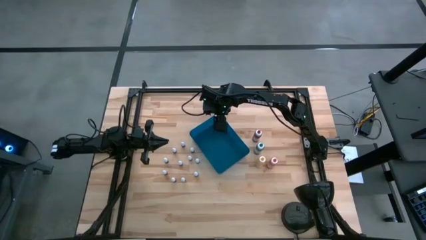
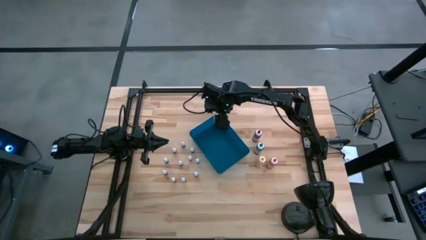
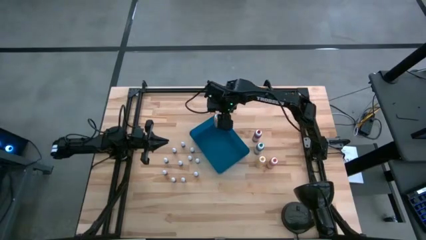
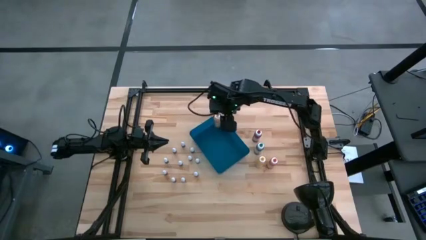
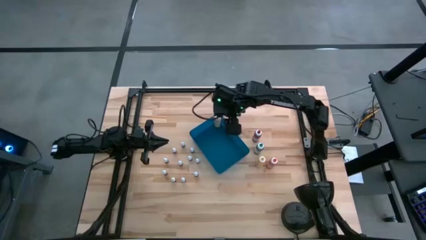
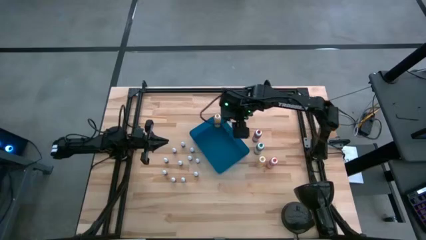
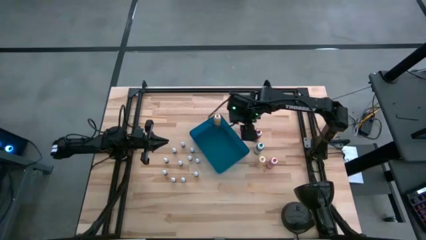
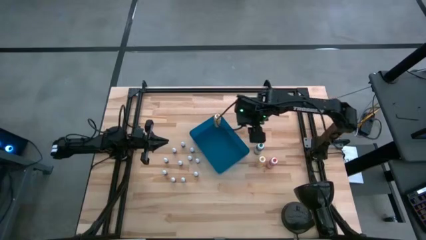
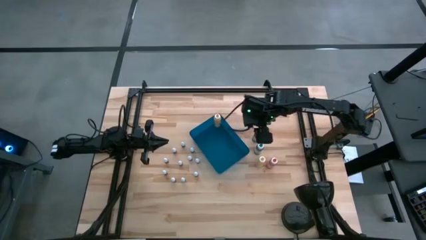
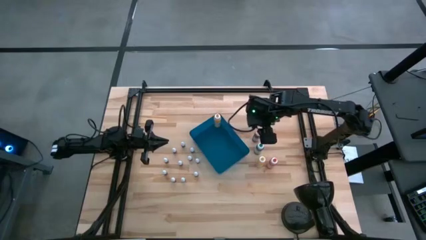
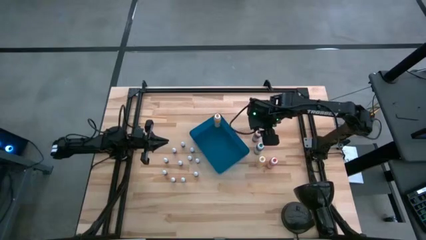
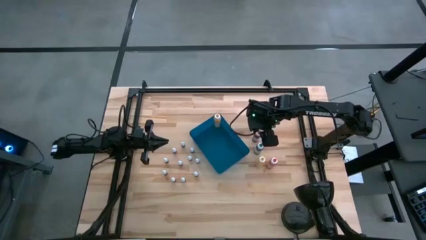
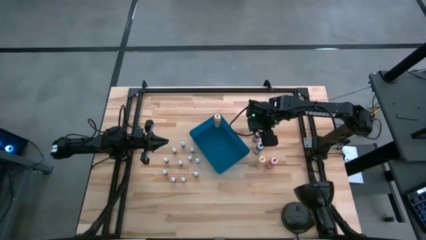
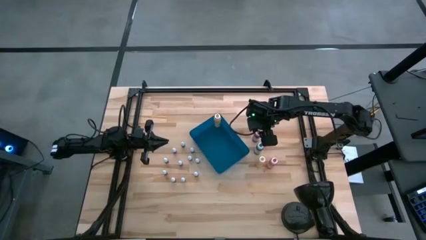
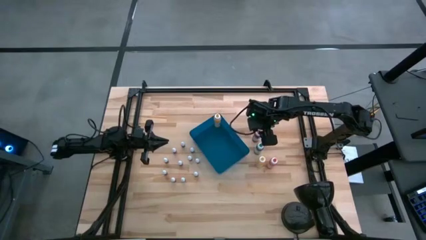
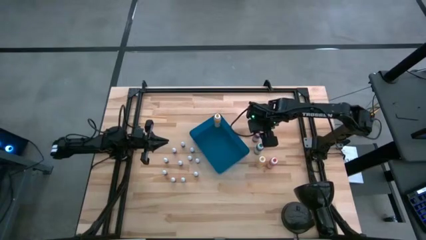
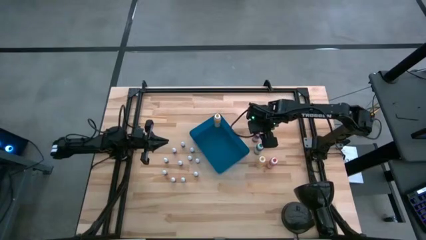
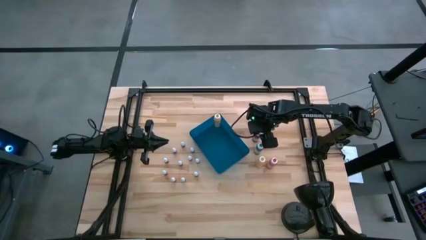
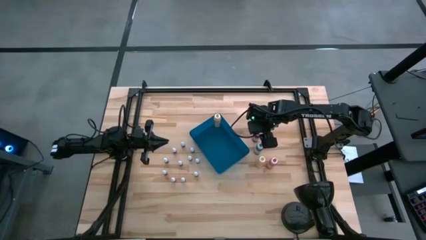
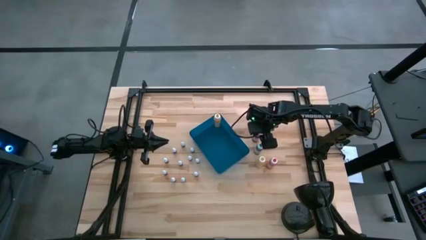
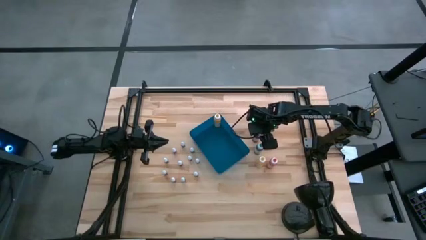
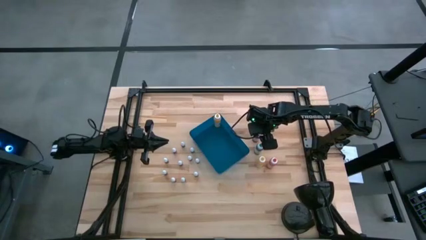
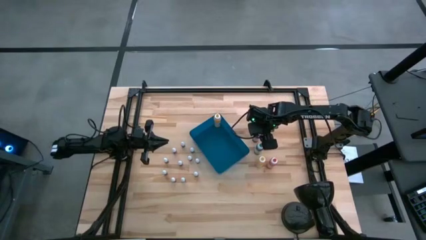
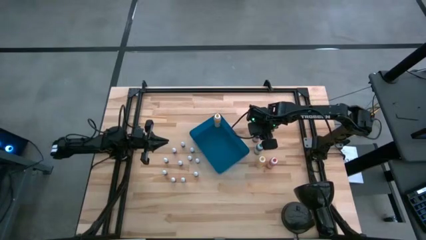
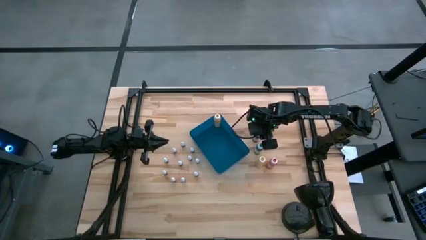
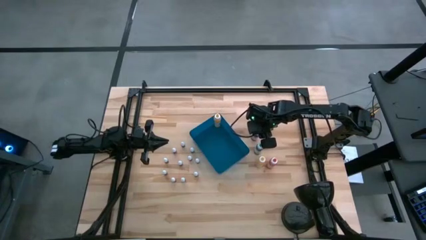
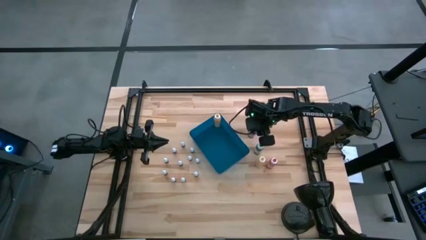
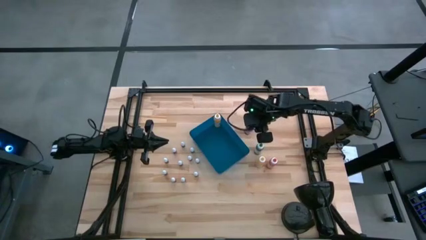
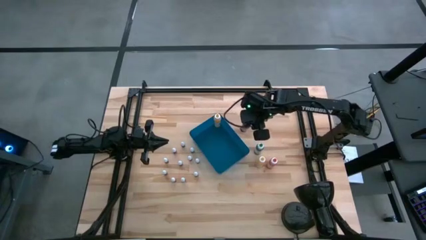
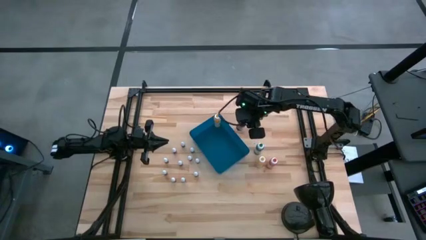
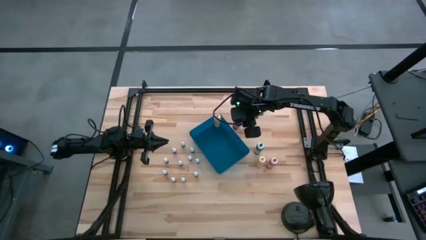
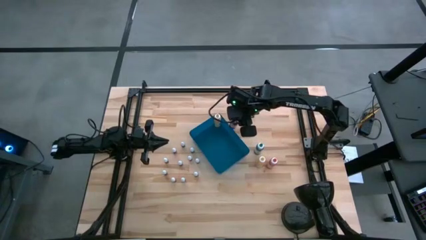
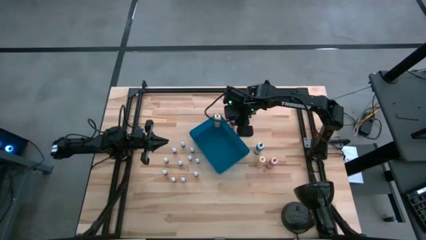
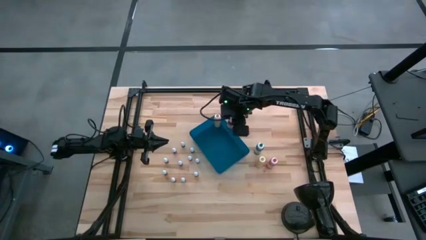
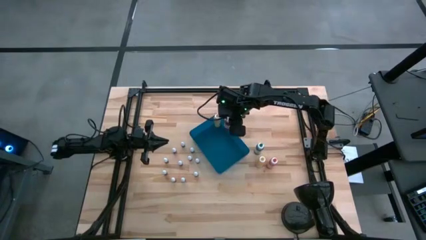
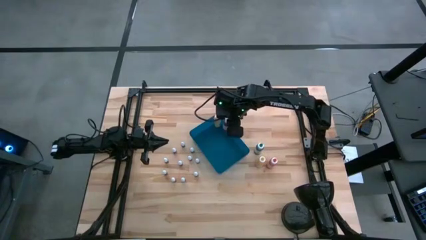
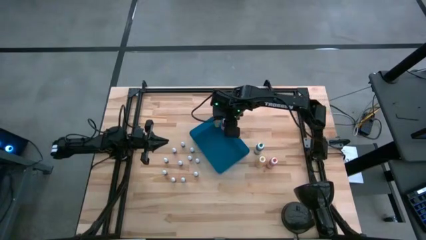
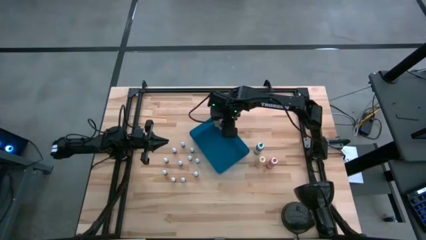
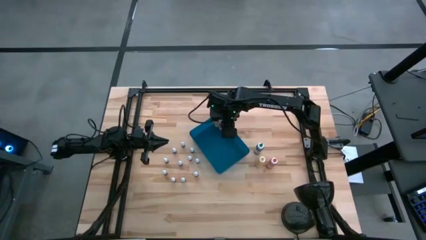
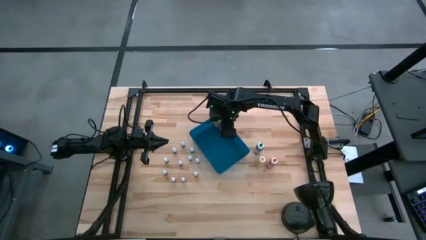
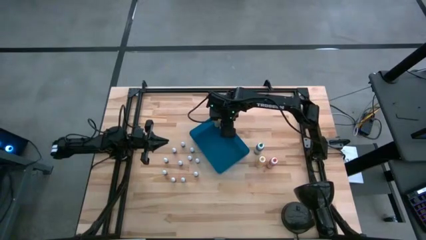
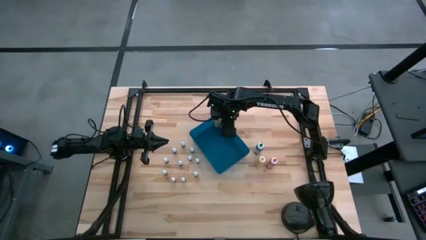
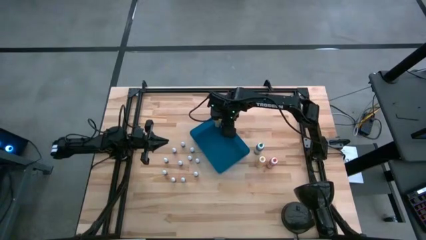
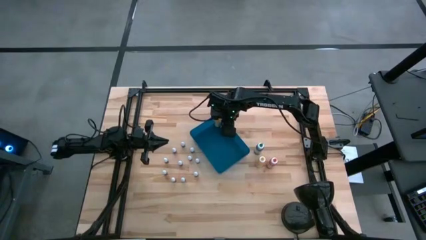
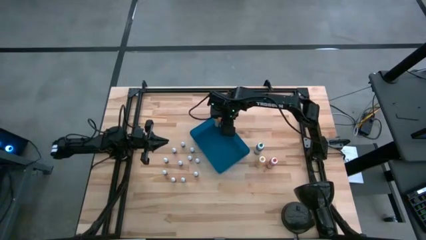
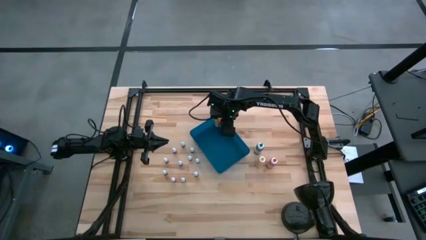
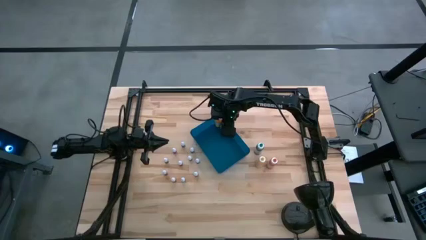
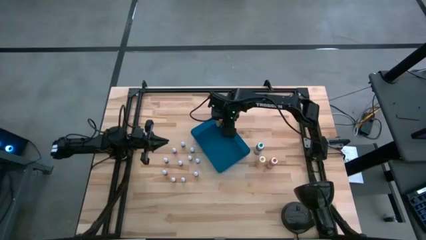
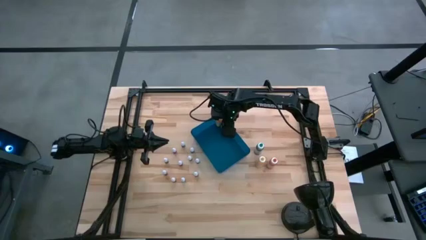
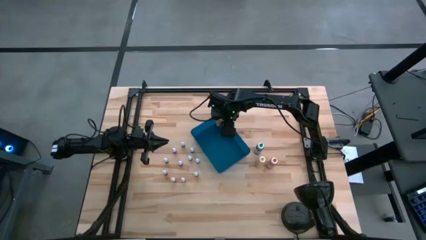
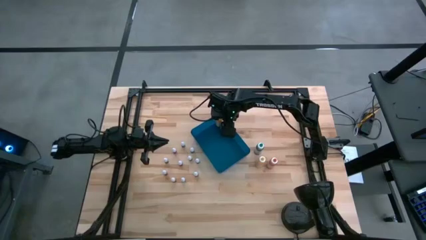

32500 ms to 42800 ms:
Task: Pick & Place food coloring
Put the red food coloring bottle into the blue bin

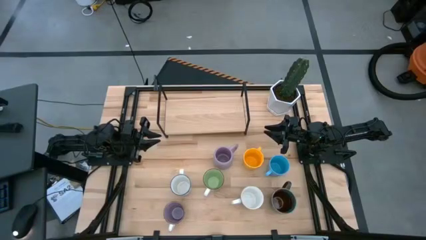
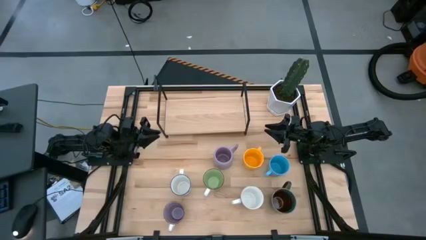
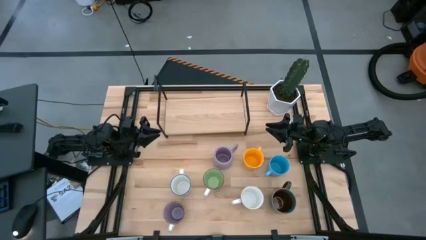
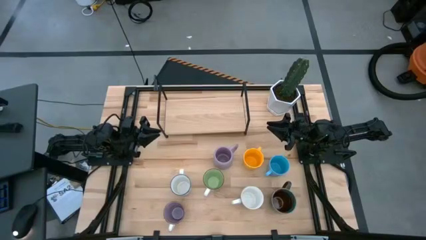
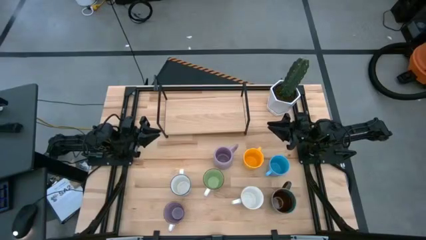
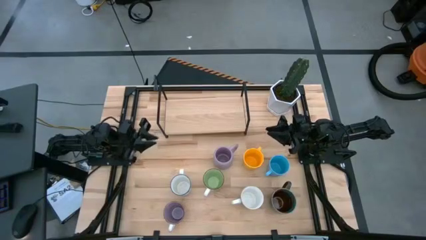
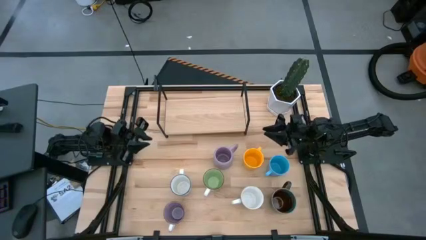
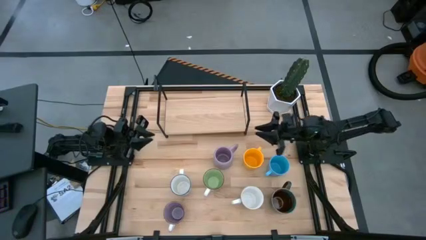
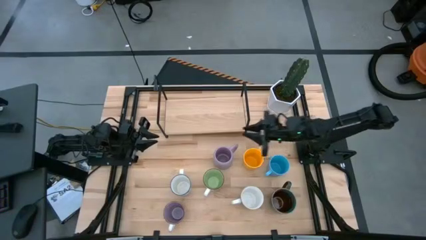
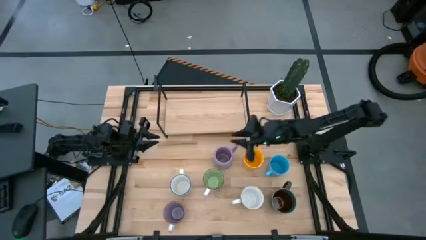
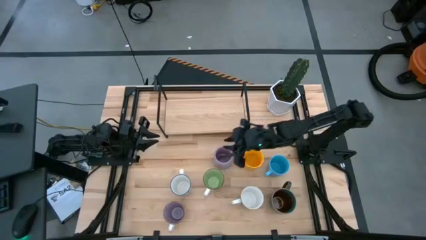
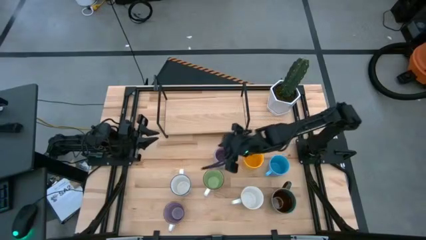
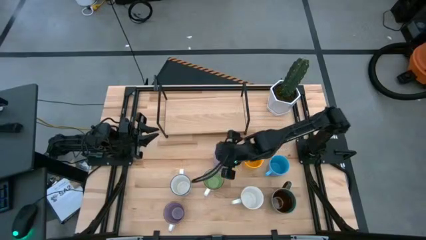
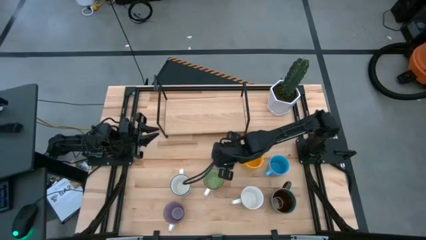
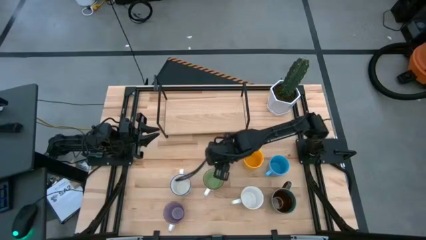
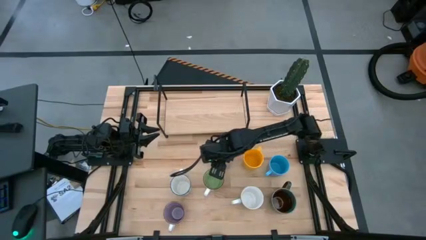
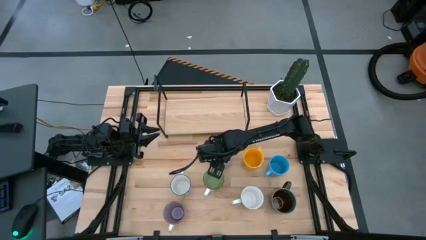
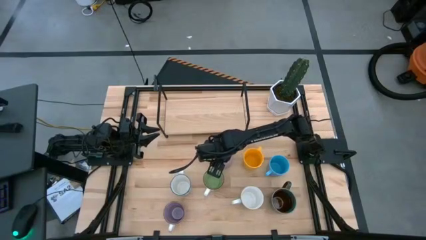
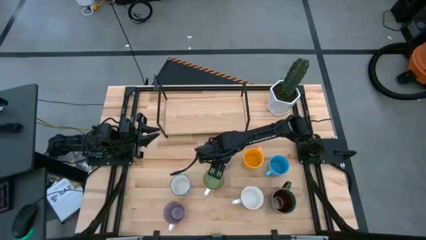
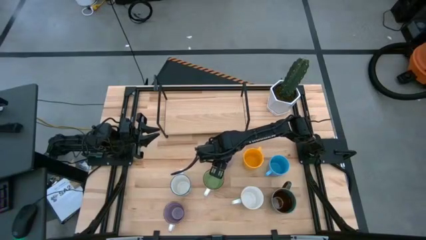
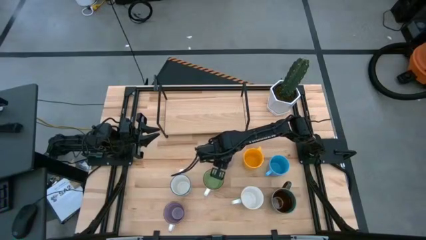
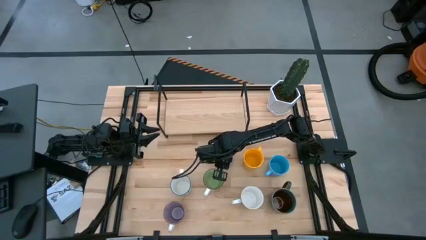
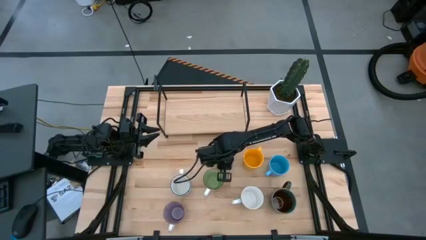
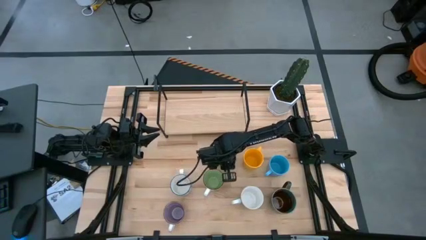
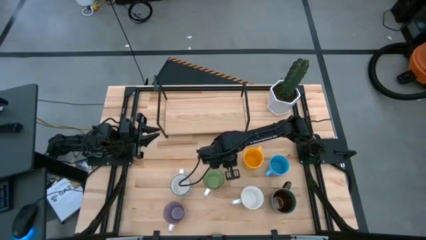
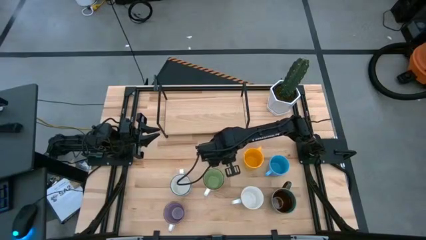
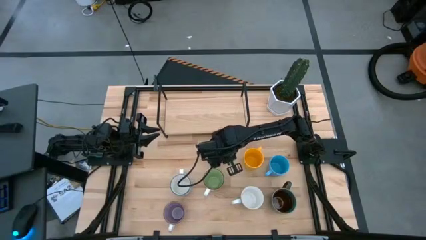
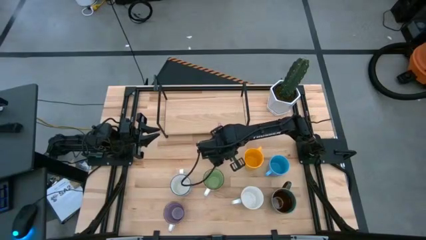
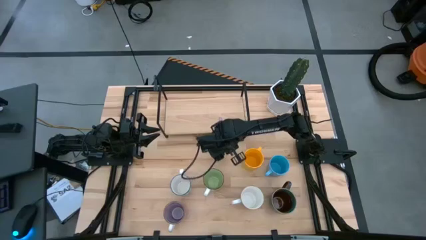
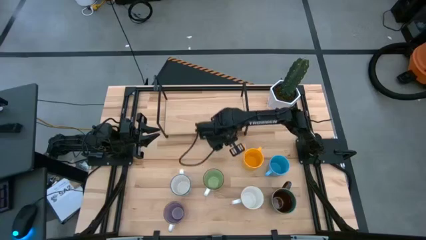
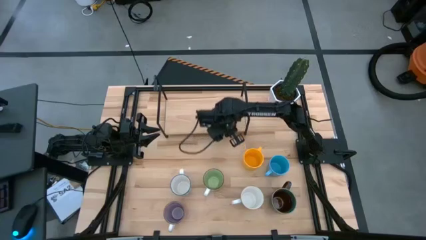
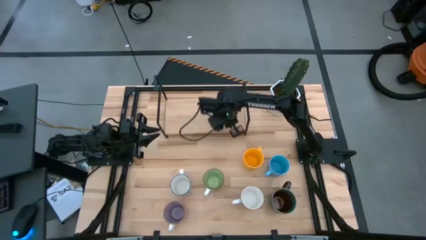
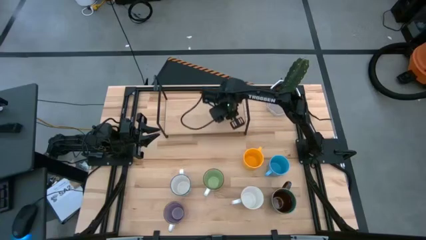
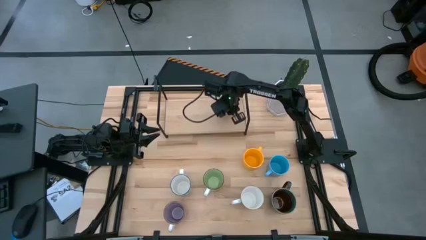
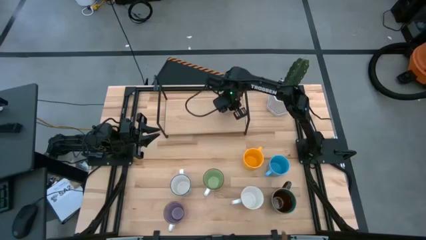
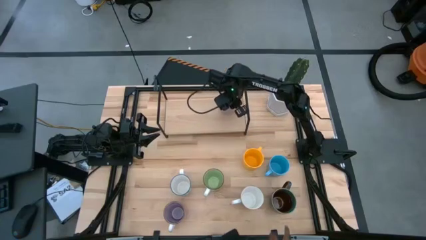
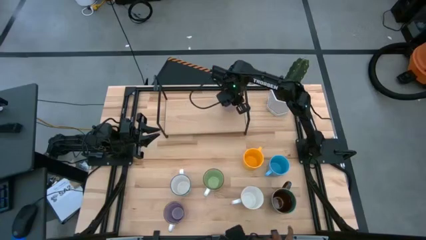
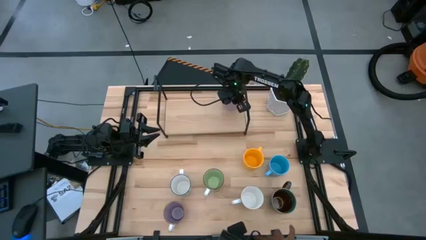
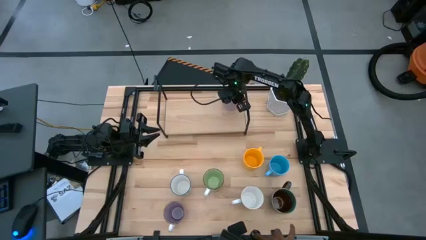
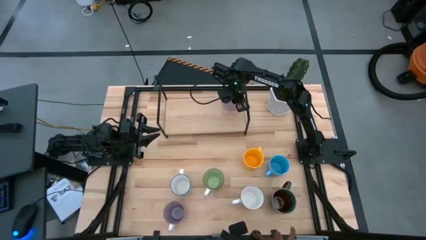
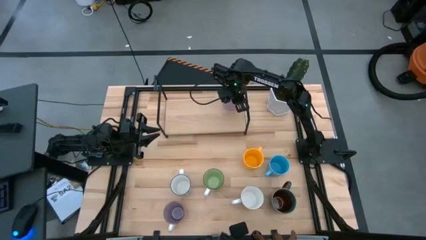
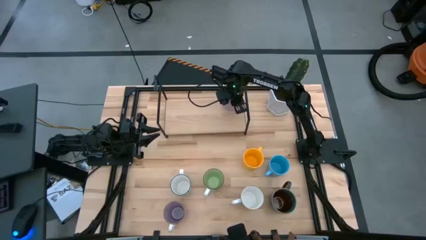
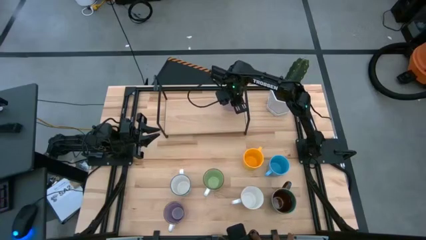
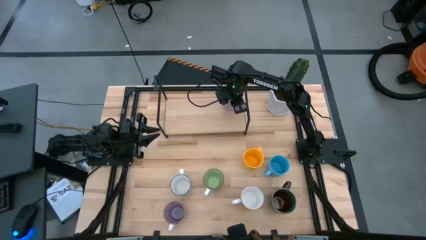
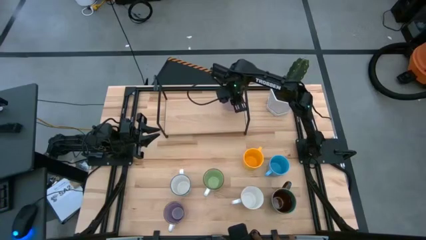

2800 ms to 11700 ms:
Task: Place coffee mugs
Put the top purple mug on the shelf
